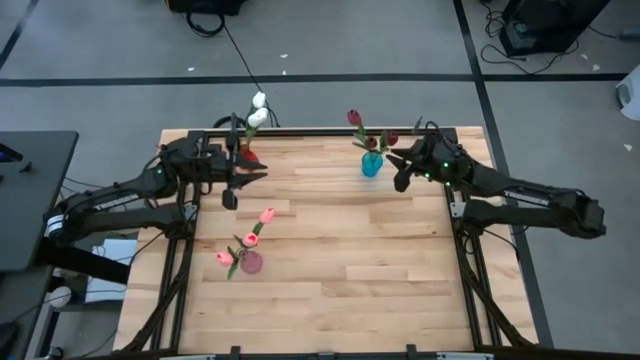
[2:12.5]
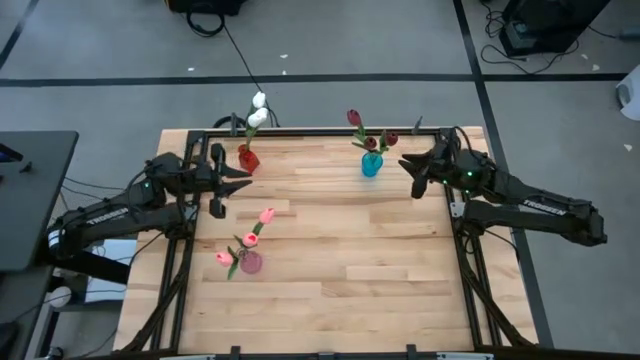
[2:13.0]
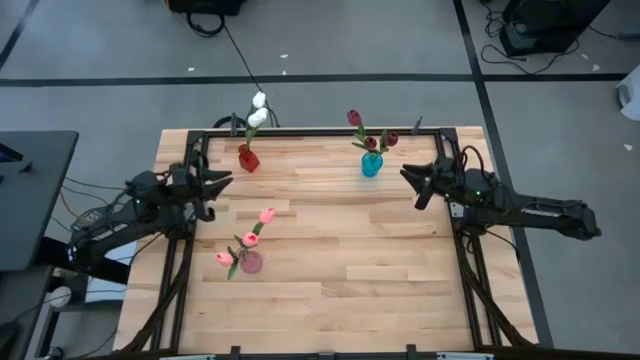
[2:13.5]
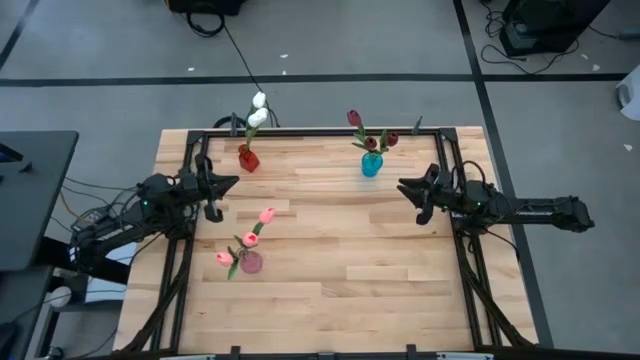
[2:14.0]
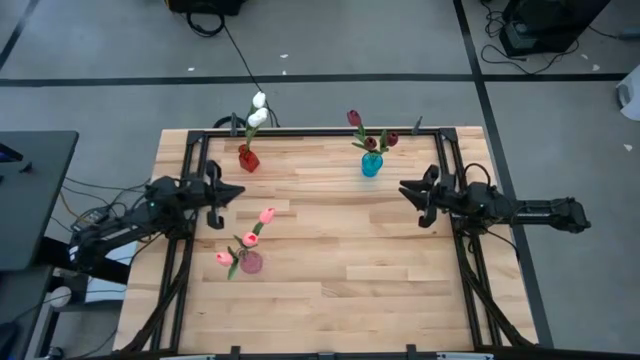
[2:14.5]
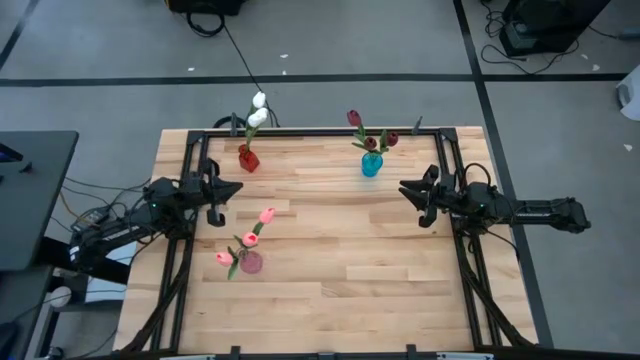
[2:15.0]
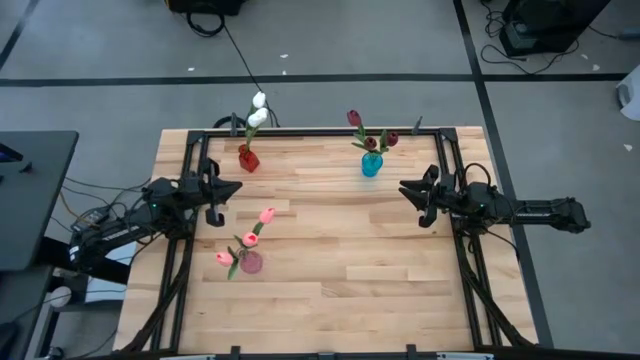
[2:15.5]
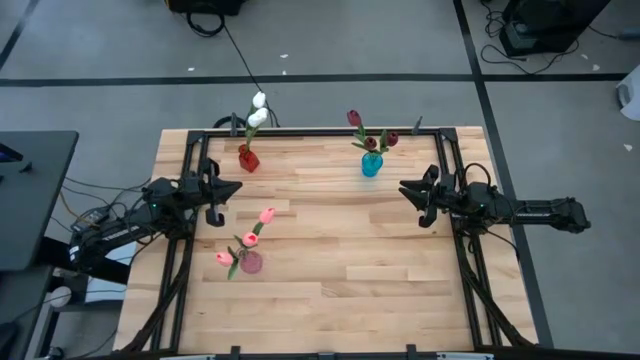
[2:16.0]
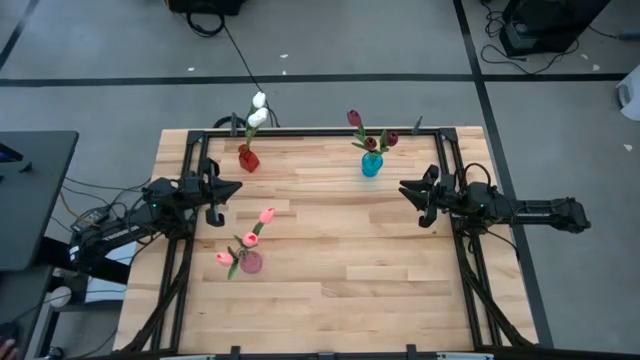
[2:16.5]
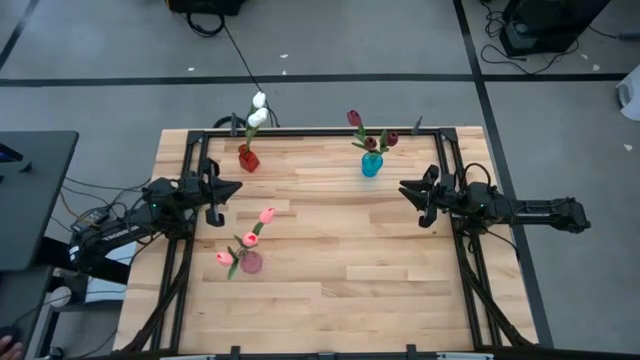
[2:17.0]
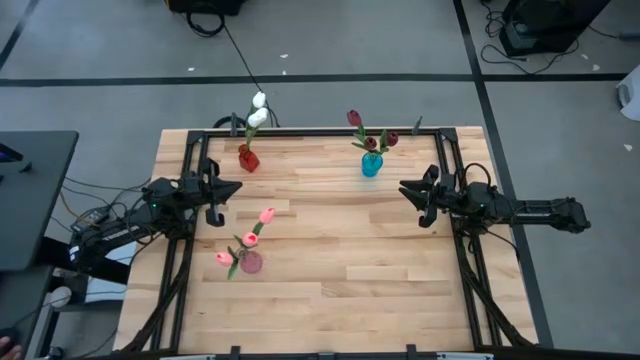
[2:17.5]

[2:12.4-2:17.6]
Task: Sort flowers into vase by color
Return to Home Position

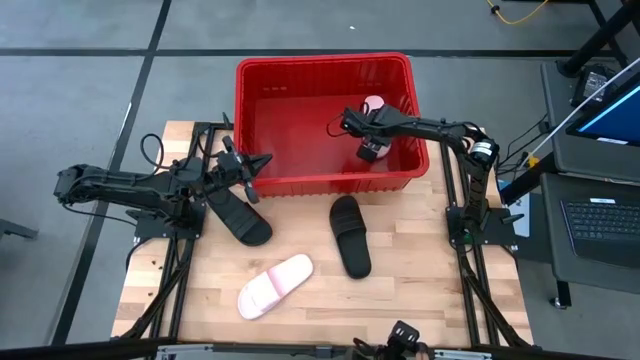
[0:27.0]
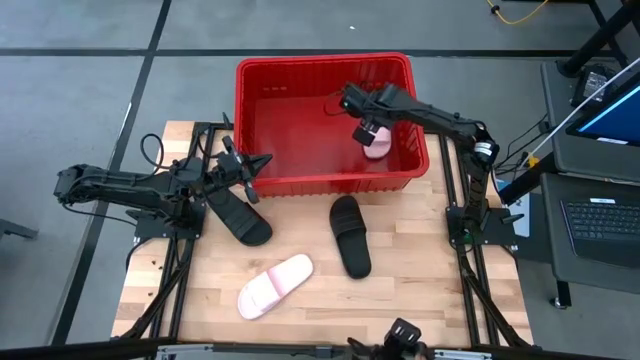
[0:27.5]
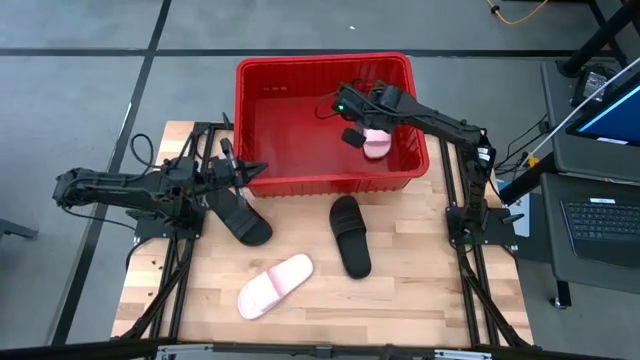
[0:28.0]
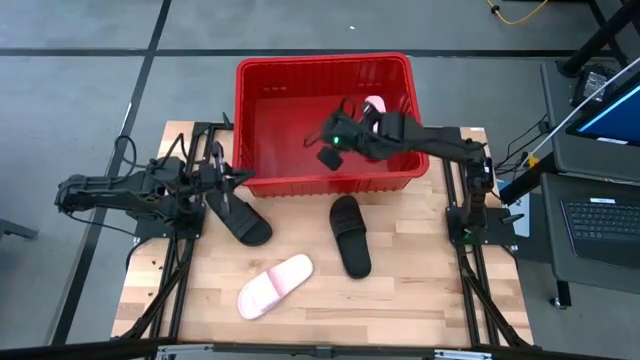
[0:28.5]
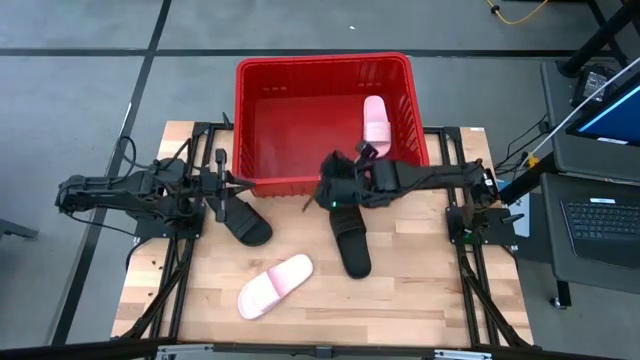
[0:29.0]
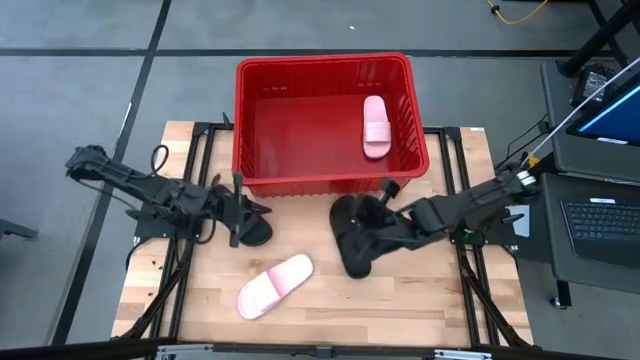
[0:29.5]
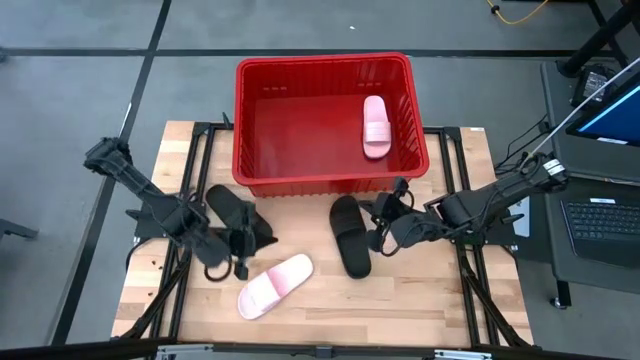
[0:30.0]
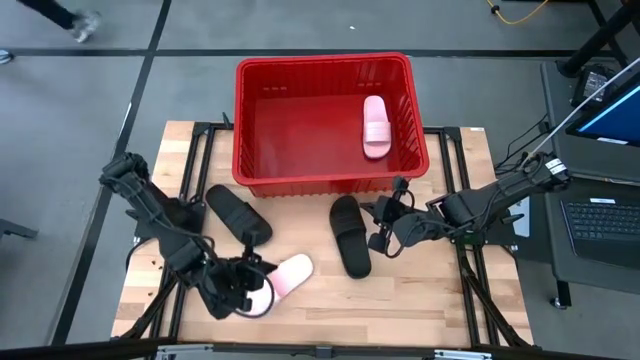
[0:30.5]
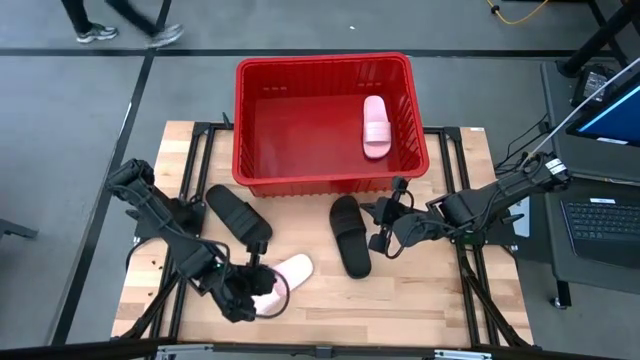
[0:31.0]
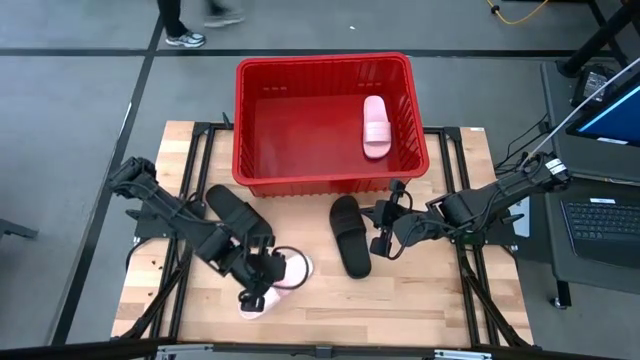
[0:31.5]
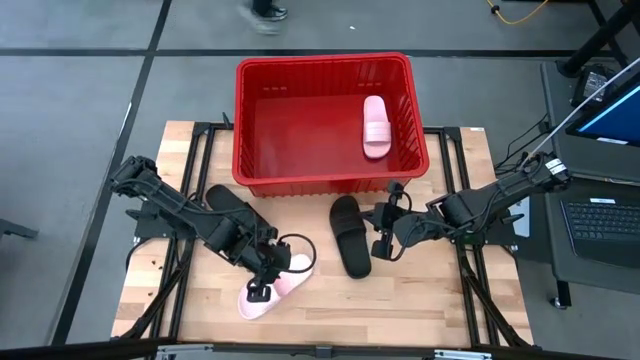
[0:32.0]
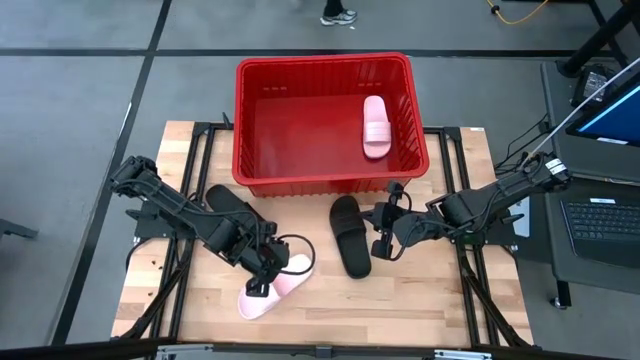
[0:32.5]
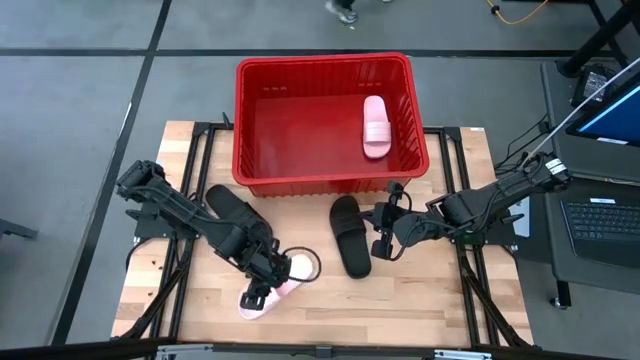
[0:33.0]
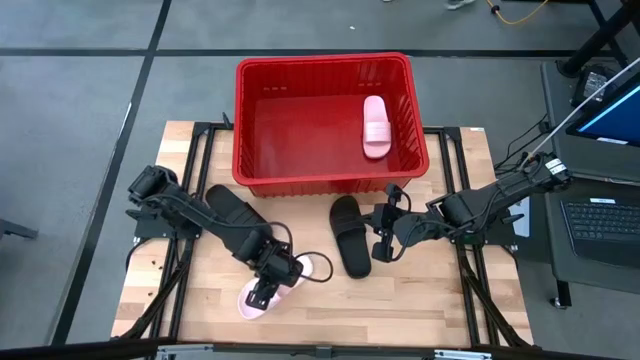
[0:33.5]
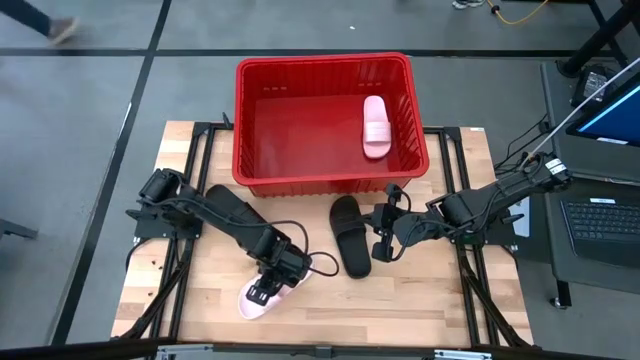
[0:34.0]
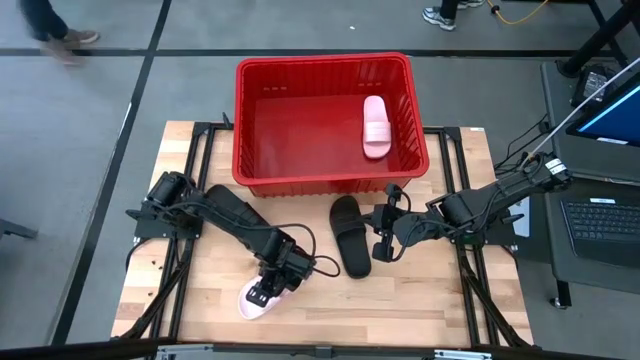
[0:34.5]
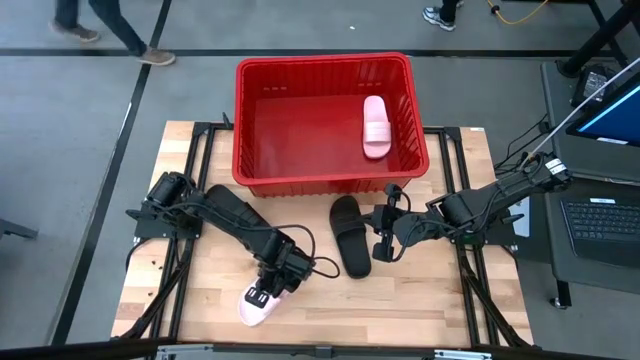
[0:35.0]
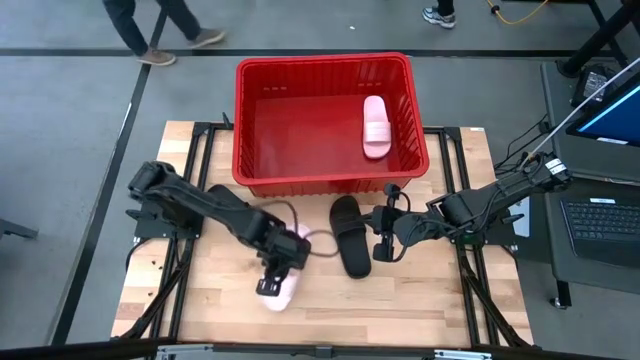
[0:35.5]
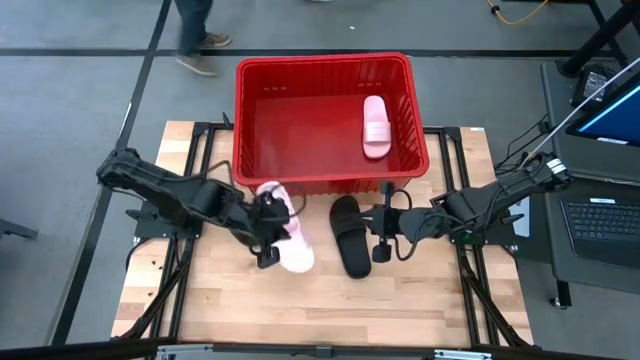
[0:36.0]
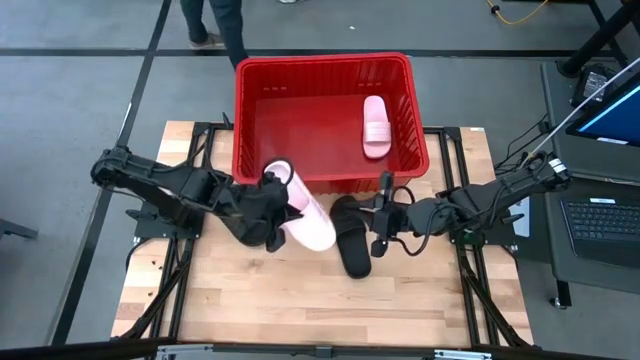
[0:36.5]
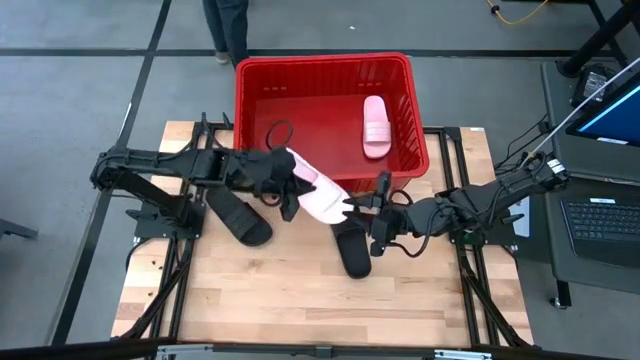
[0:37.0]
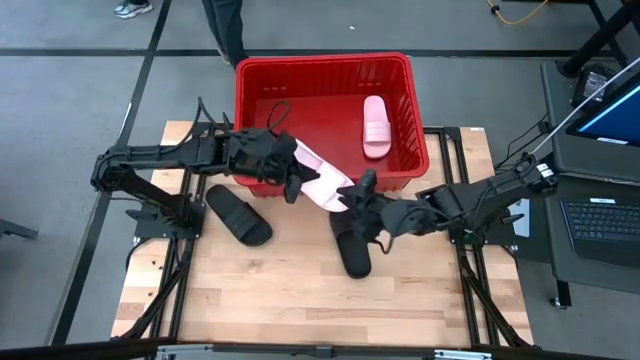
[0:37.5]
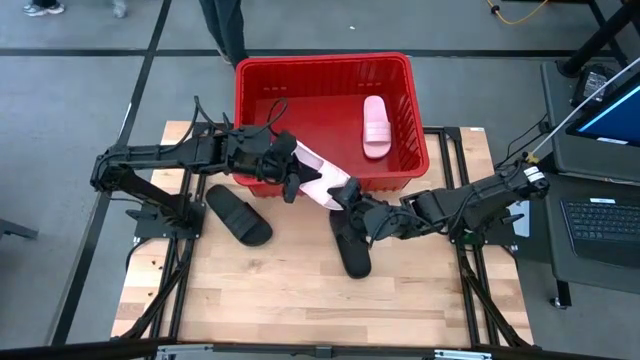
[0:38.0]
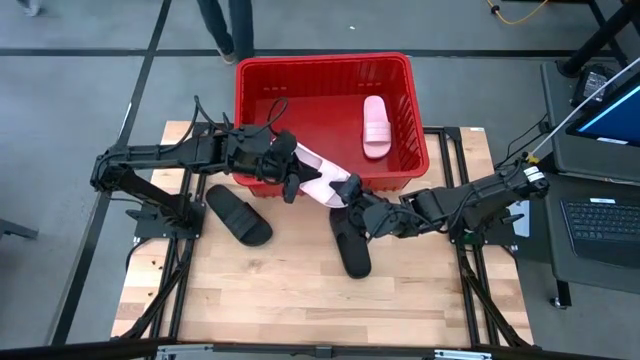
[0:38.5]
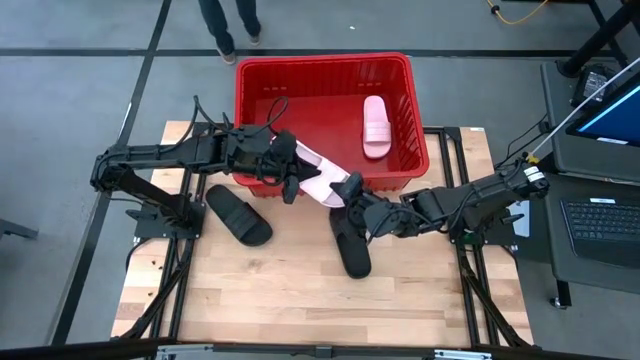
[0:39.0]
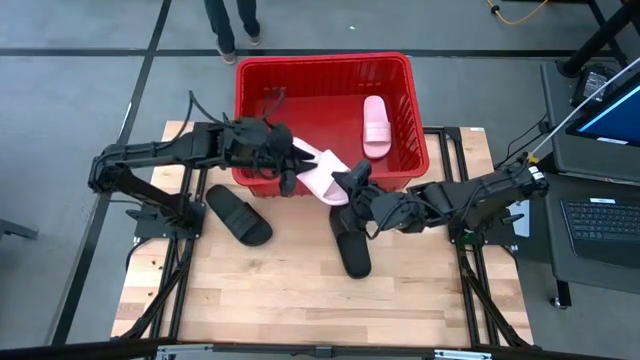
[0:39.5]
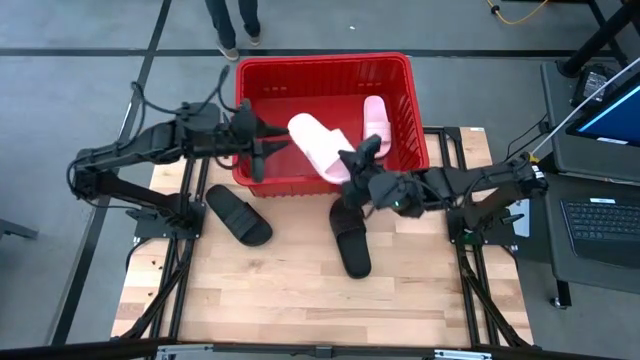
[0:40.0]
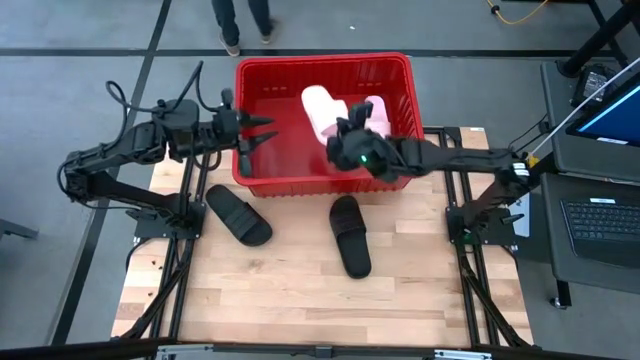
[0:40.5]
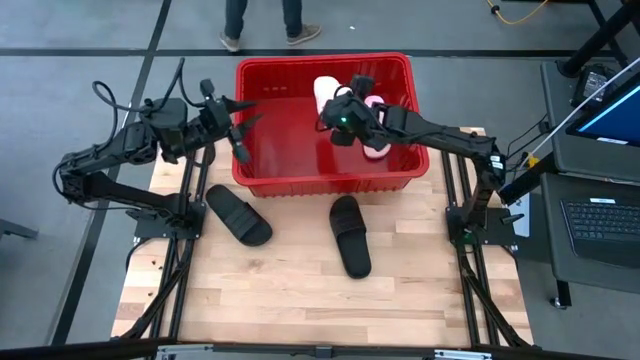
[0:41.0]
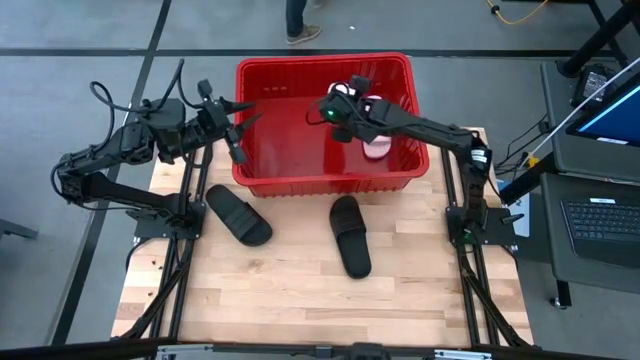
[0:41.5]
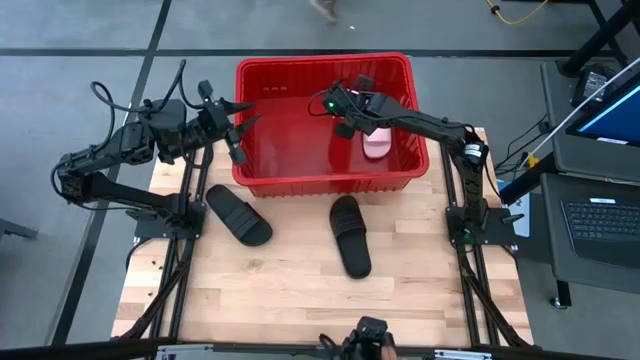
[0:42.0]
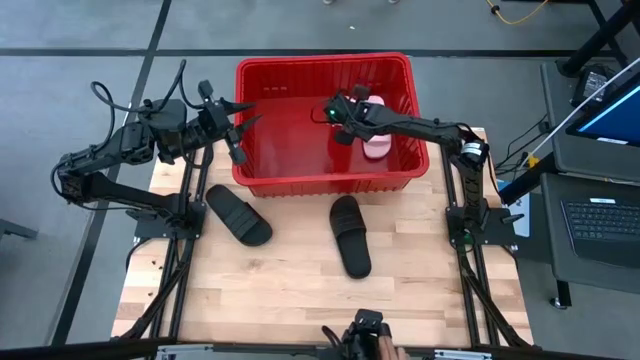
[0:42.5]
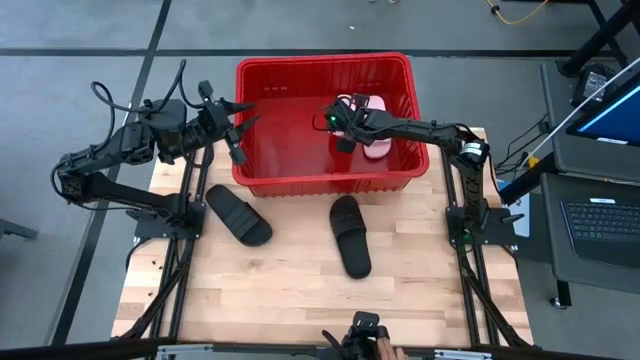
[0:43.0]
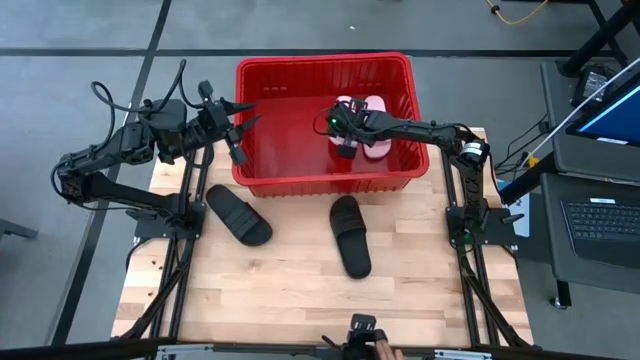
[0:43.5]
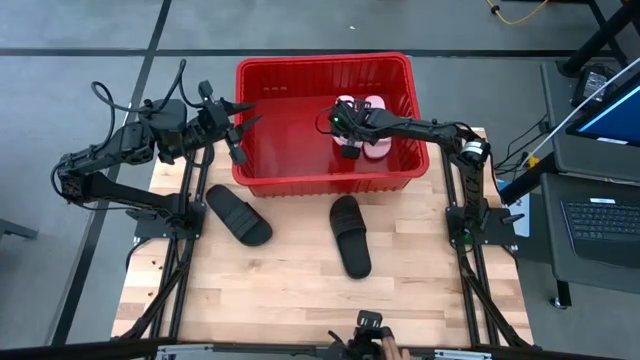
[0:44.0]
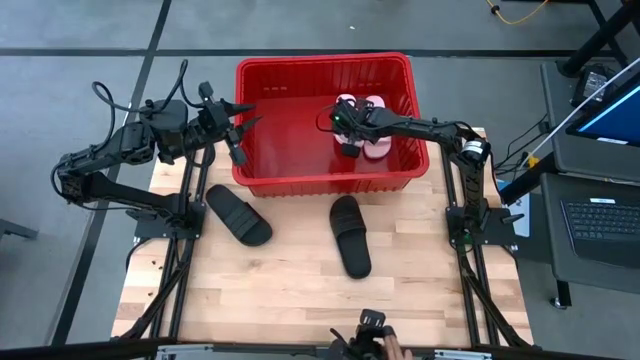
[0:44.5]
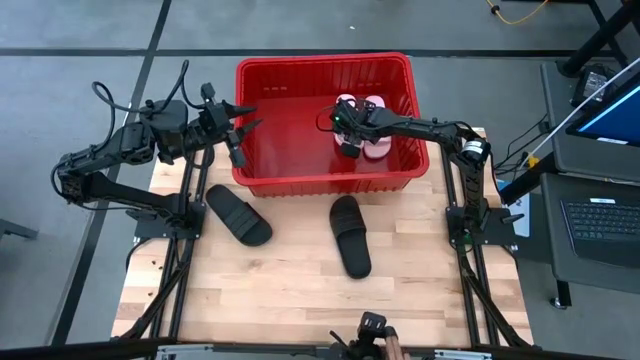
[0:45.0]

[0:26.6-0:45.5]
Task: Pick and place slides into bin
Put the pink slipper into the red bin
